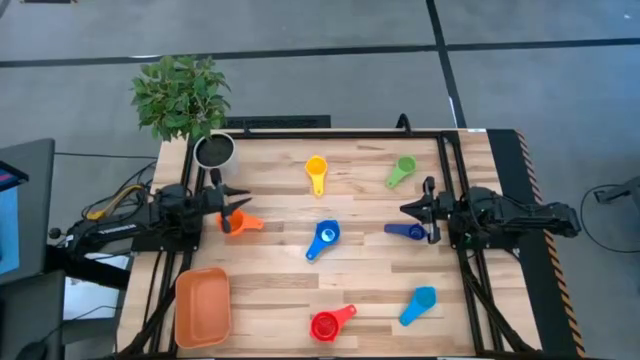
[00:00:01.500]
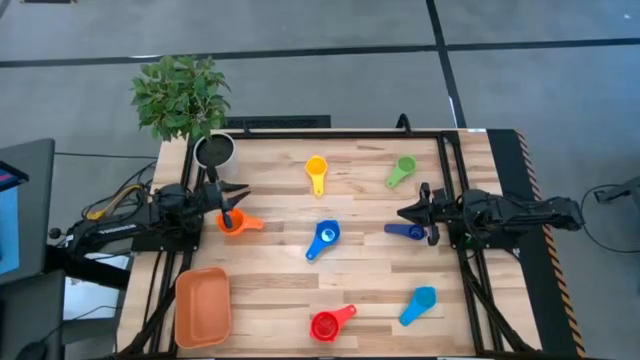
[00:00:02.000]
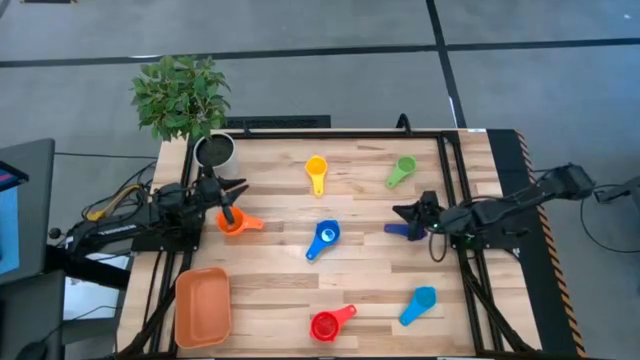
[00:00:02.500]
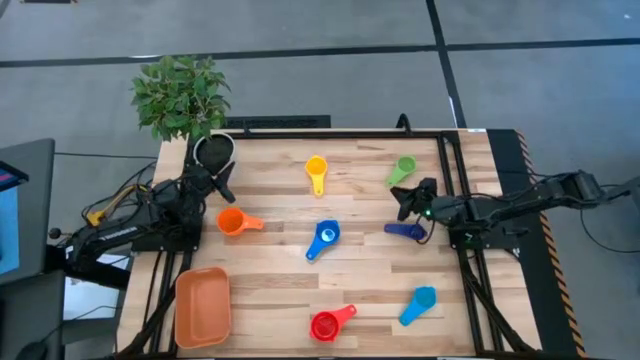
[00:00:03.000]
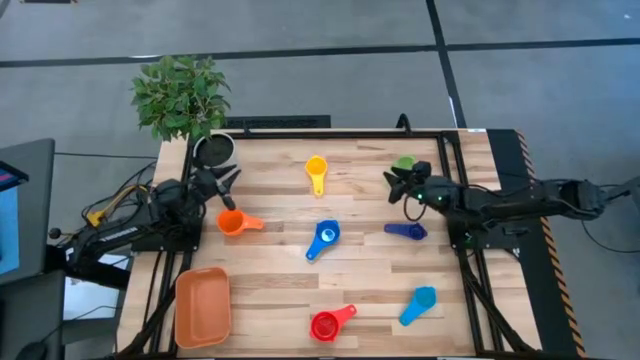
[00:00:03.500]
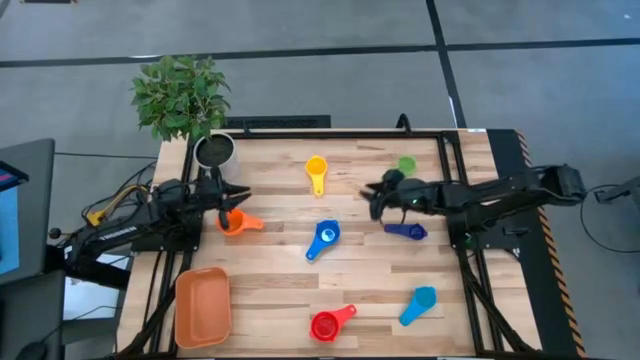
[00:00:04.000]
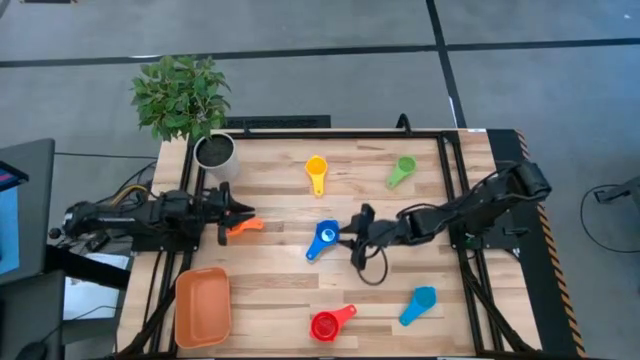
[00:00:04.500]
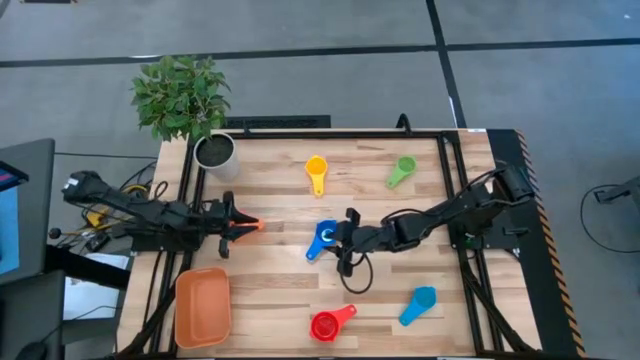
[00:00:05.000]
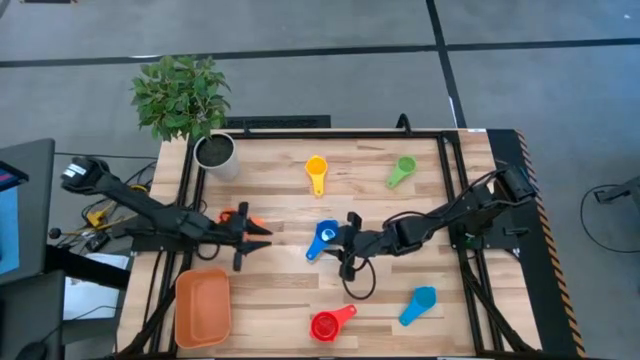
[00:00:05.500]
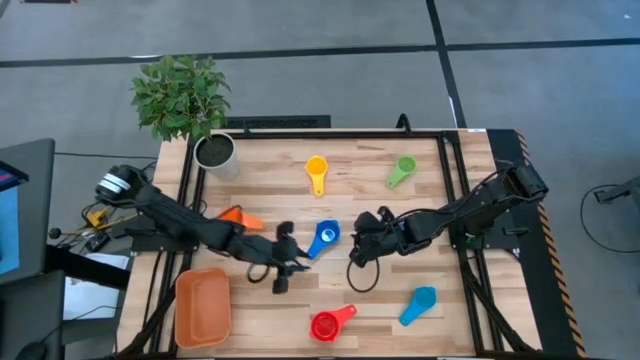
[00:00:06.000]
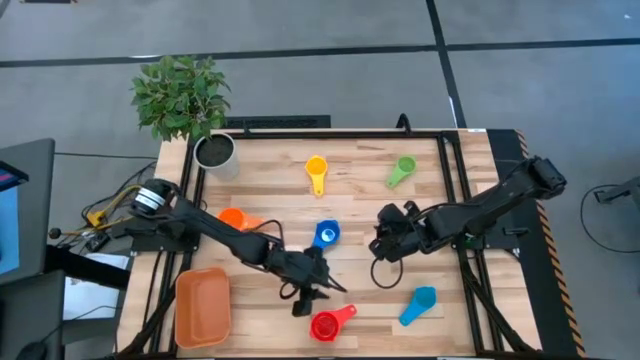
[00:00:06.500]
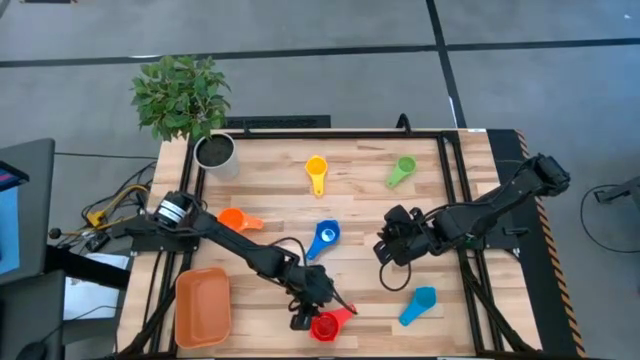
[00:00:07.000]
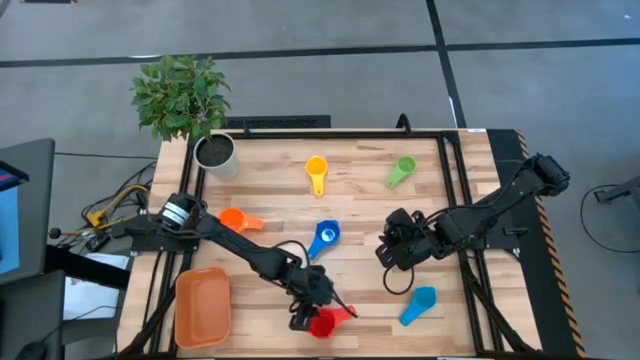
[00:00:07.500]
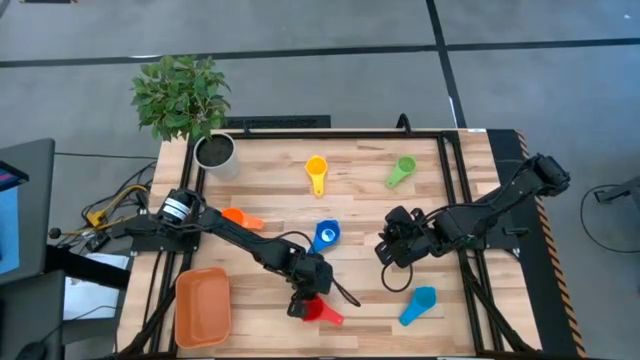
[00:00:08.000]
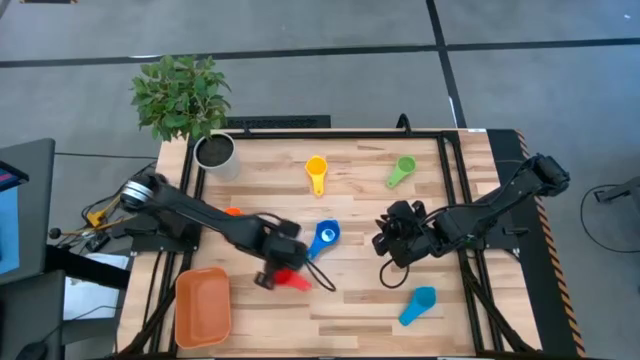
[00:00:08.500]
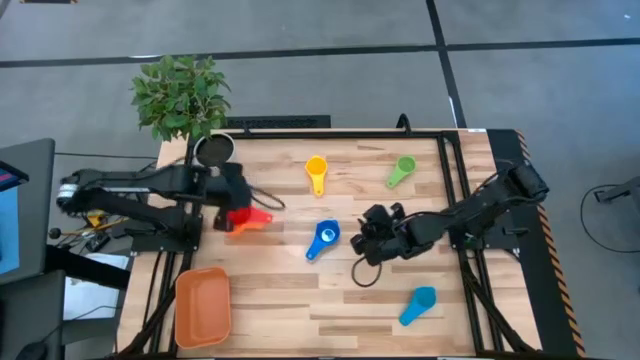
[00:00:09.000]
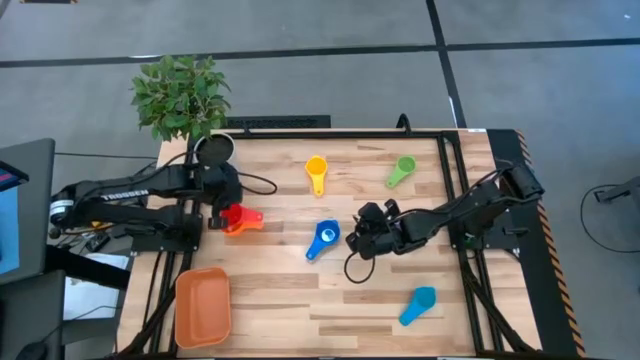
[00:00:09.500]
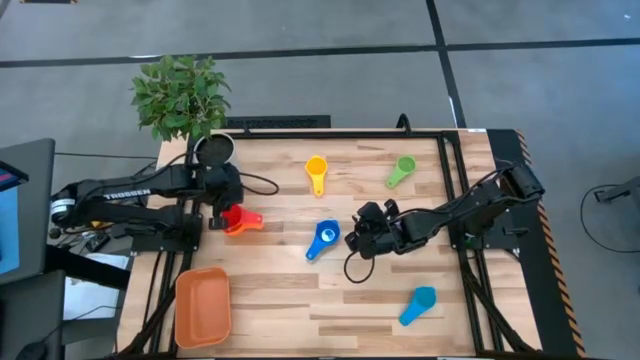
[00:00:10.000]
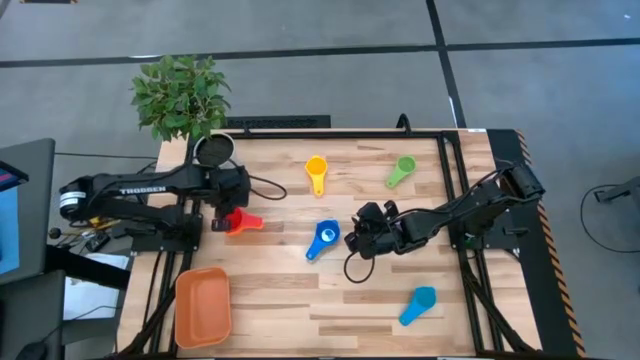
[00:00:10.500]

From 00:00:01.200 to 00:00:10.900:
Task: Nest measuring cups in basket
Stack the red measuring cup on top of the orange measuring cup

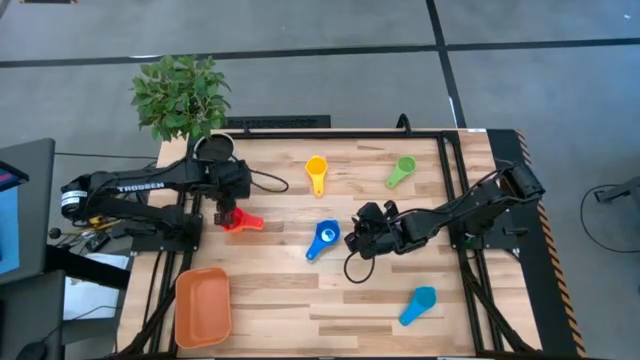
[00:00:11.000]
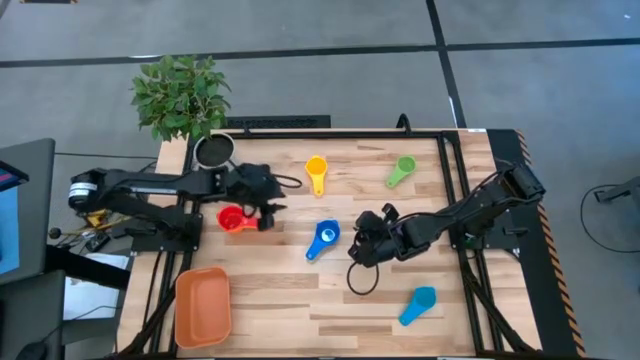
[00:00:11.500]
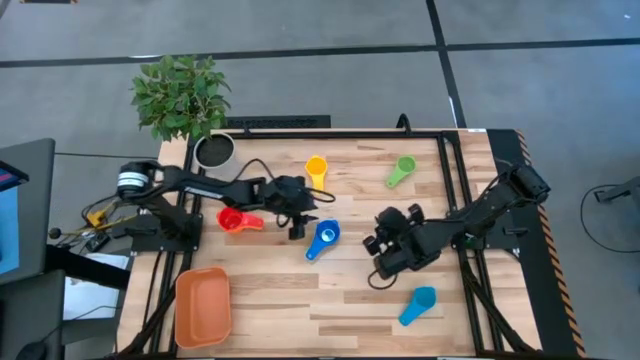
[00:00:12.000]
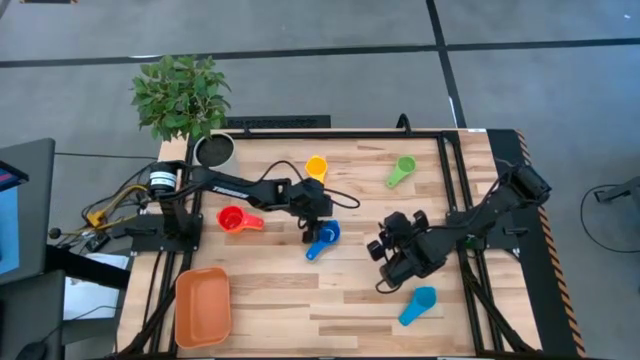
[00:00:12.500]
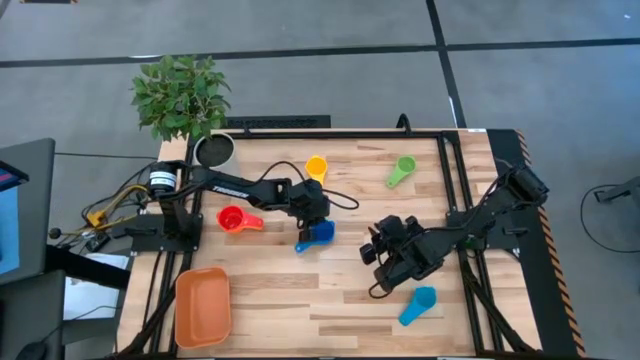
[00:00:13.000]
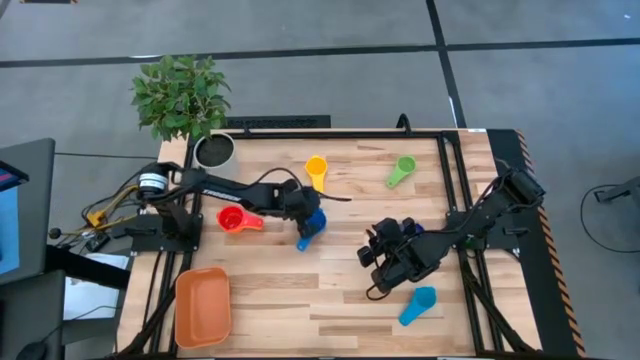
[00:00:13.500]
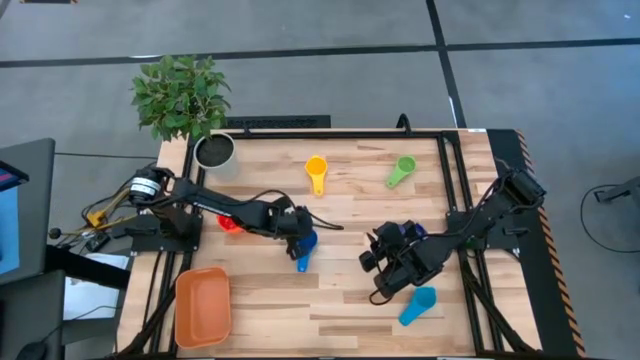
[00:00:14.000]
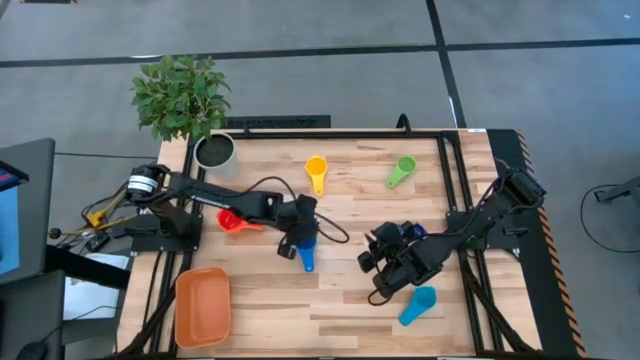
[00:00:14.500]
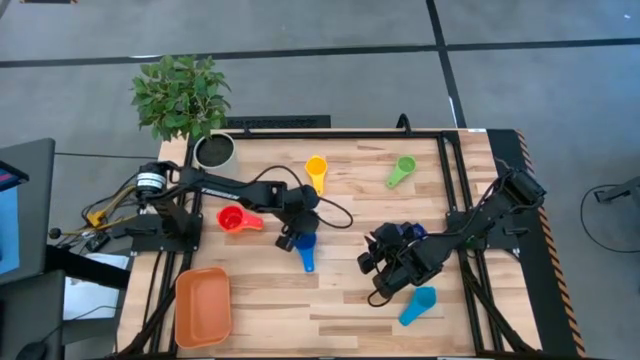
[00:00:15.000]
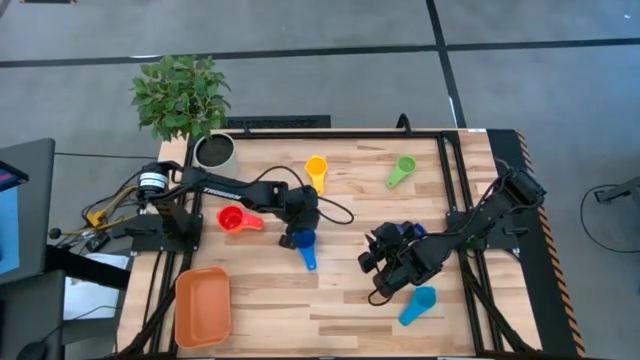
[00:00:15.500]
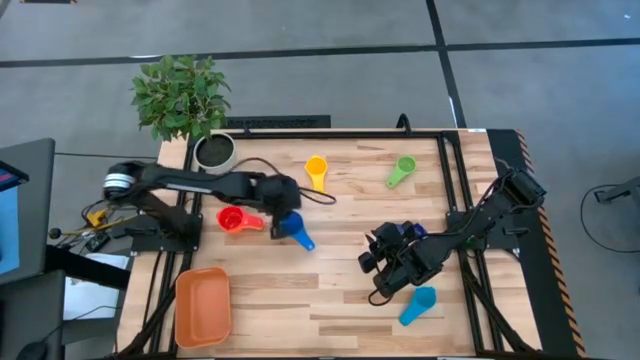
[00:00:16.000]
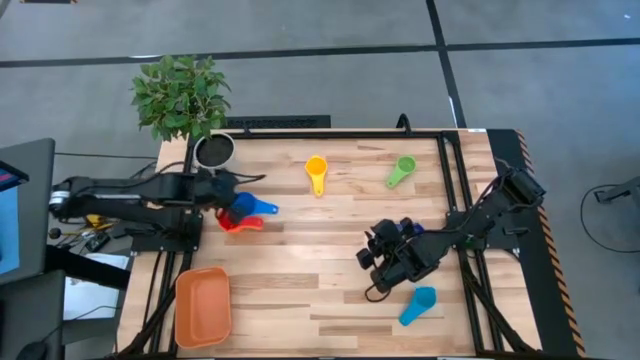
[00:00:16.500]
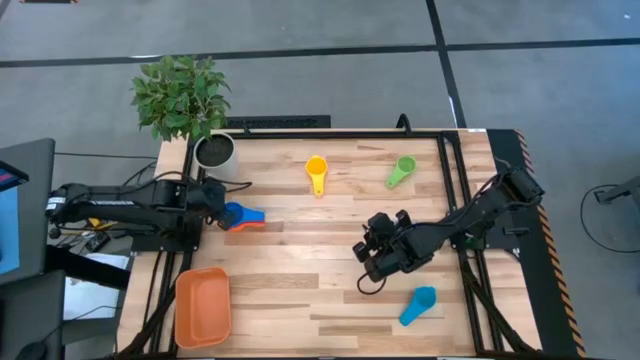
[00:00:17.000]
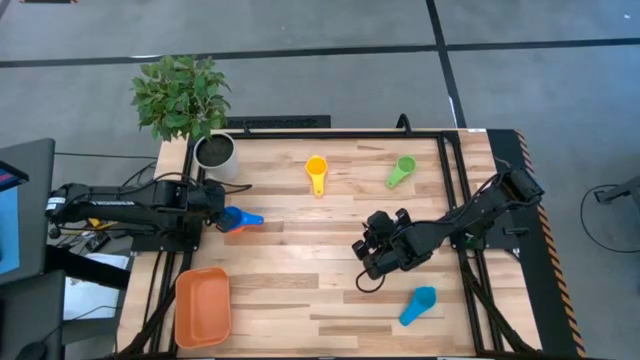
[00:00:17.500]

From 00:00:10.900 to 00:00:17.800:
Stack the blue measuring cup on top of the red measuring cup

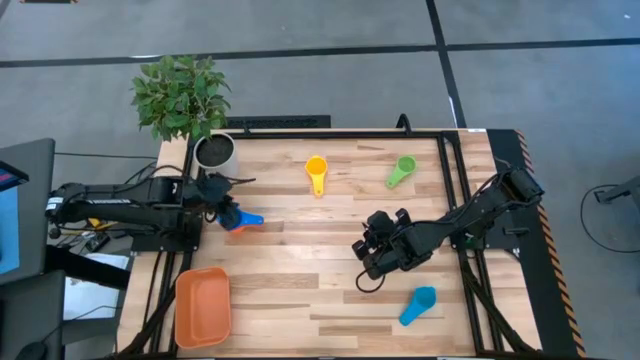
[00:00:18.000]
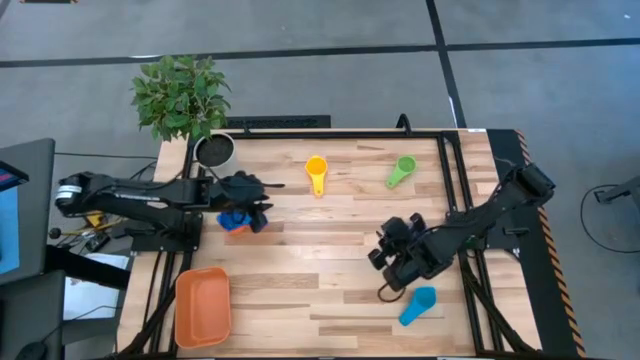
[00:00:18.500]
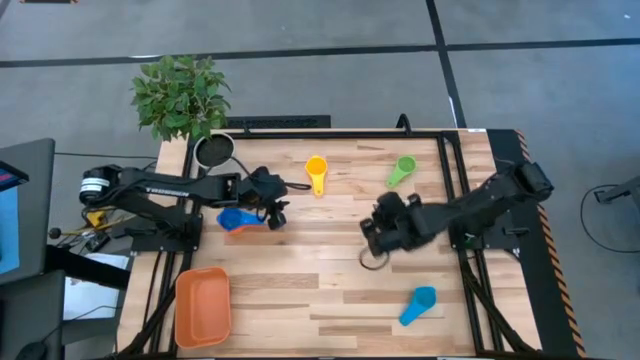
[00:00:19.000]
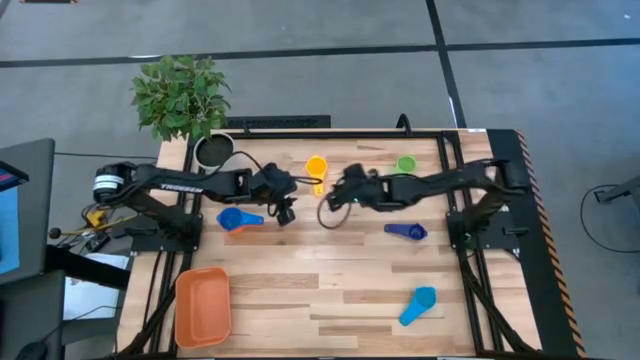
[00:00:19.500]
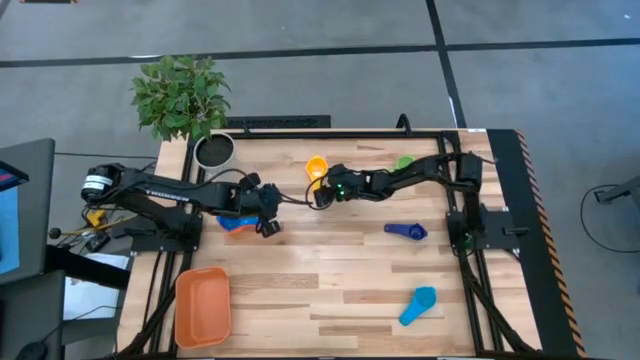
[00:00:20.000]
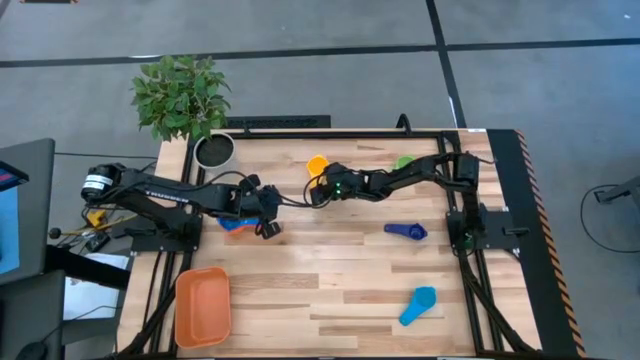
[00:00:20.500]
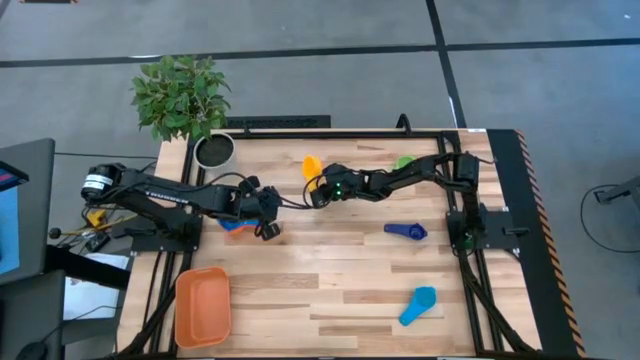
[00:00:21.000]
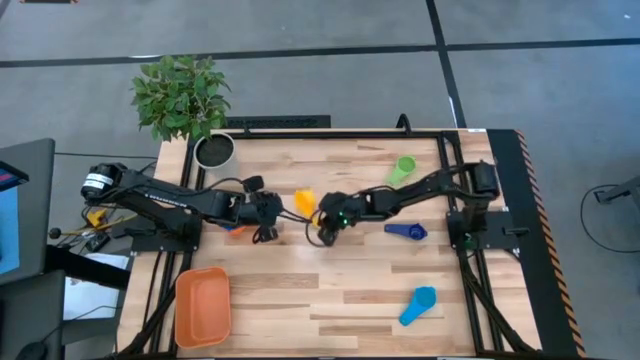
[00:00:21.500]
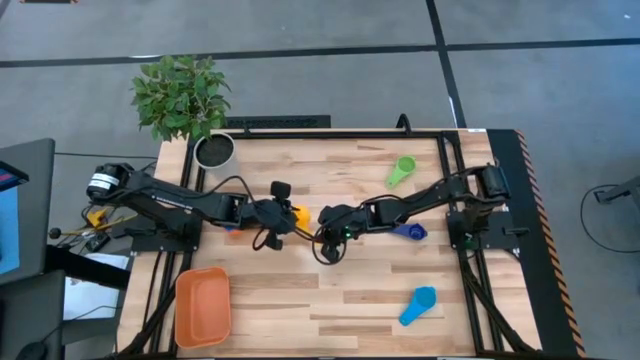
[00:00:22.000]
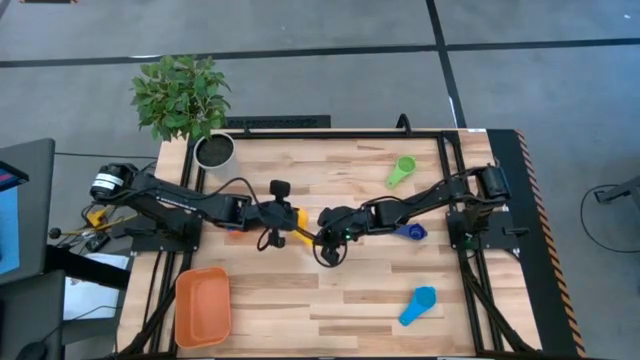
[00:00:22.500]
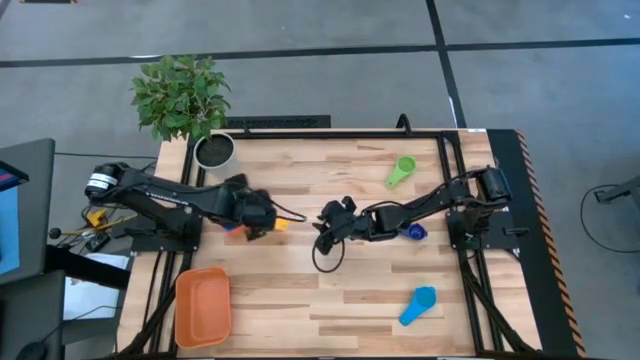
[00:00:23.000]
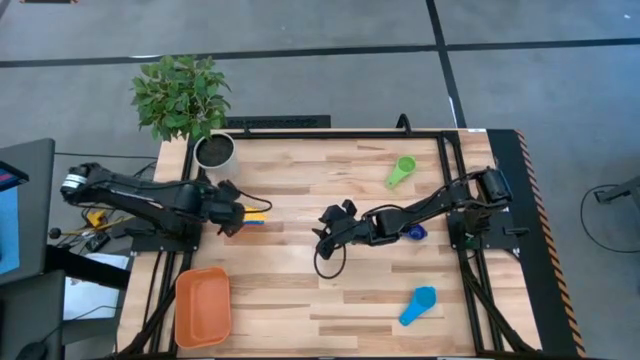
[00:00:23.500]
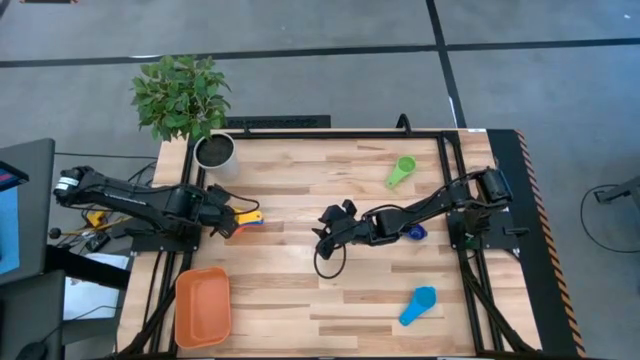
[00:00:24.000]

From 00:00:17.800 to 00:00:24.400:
Stack the yellow measuring cup on top of the blue measuring cup
